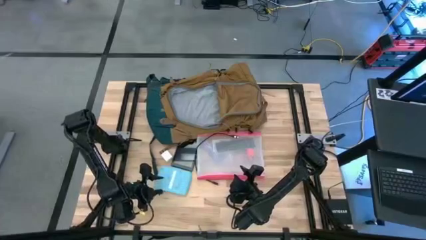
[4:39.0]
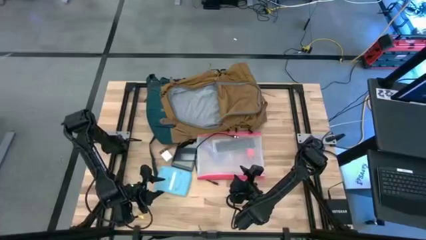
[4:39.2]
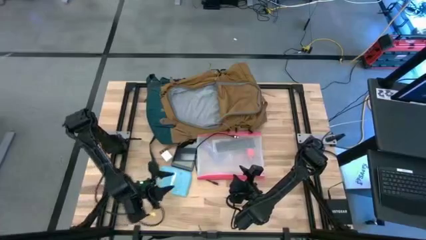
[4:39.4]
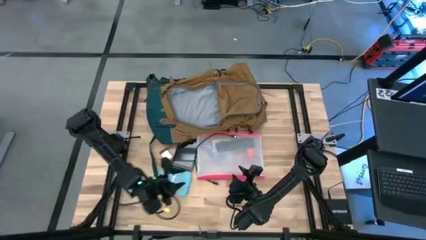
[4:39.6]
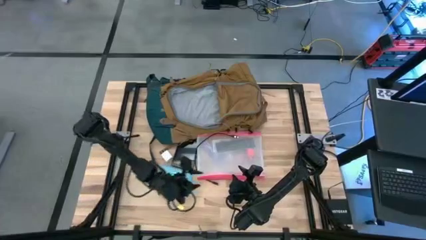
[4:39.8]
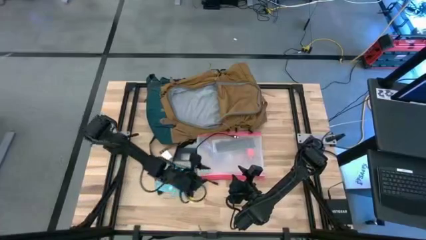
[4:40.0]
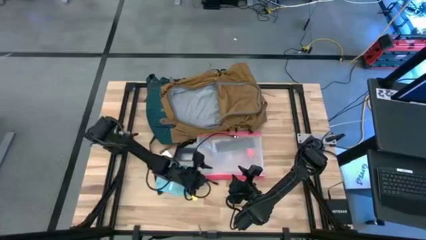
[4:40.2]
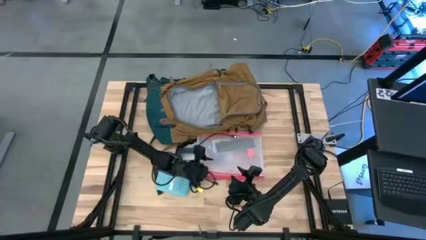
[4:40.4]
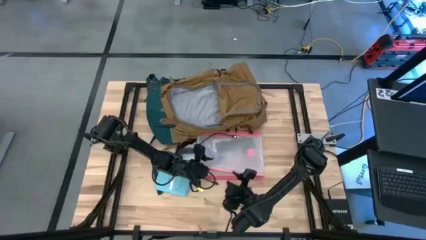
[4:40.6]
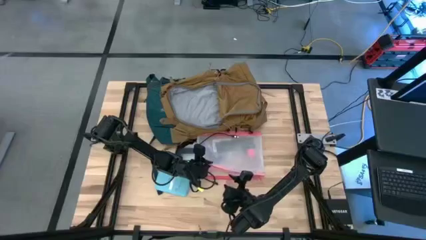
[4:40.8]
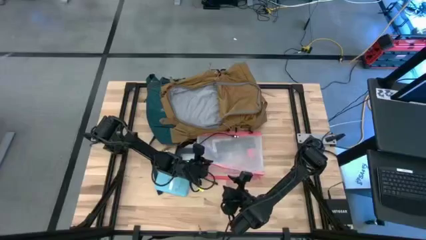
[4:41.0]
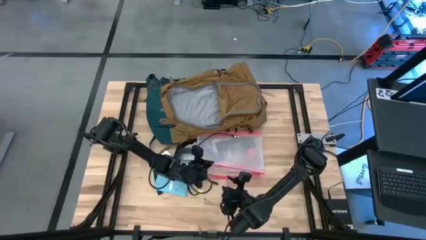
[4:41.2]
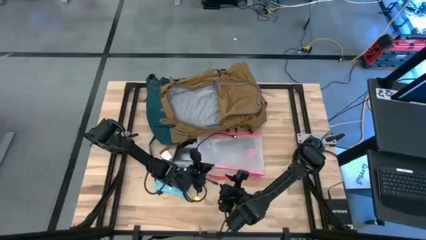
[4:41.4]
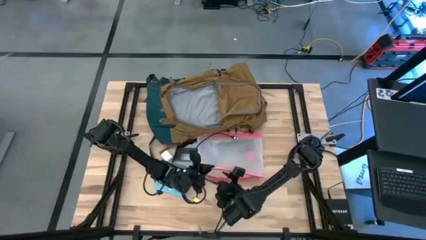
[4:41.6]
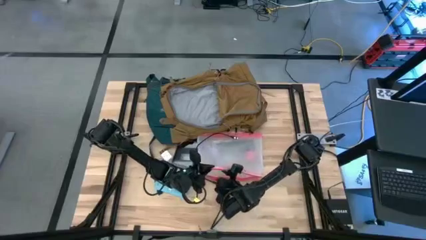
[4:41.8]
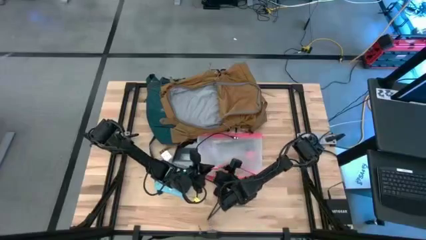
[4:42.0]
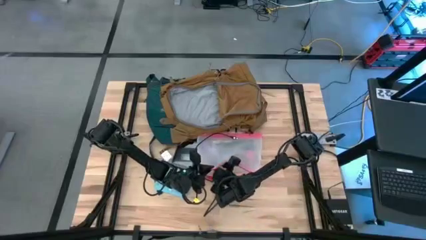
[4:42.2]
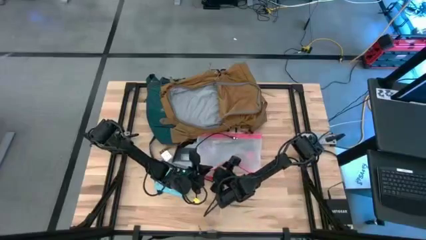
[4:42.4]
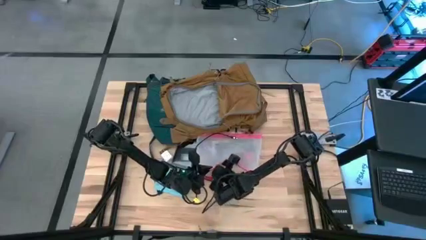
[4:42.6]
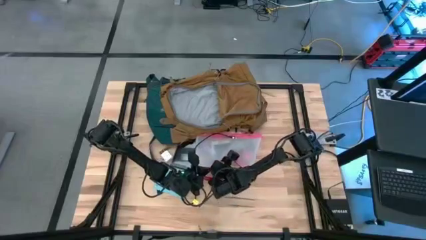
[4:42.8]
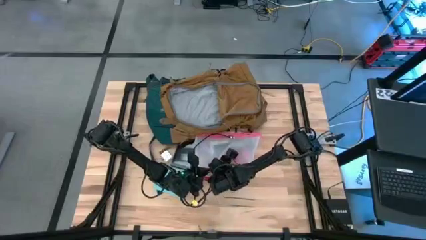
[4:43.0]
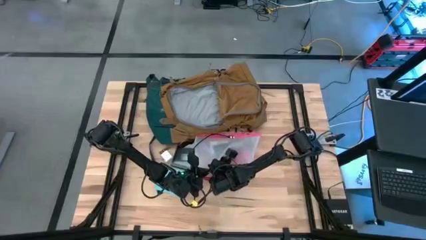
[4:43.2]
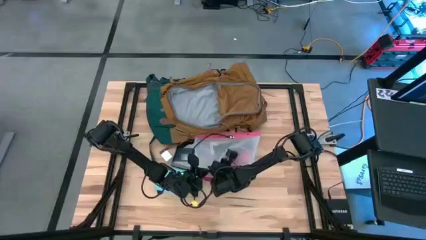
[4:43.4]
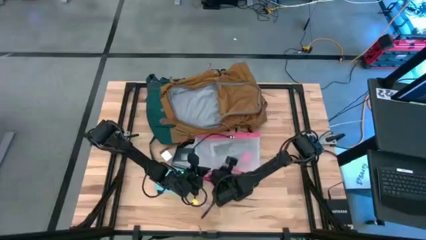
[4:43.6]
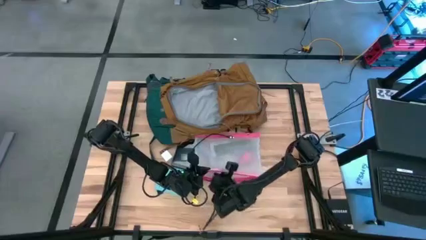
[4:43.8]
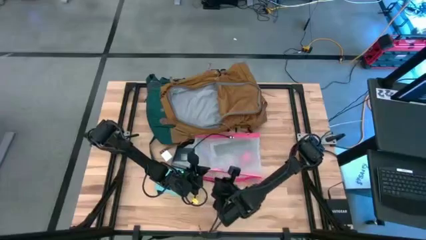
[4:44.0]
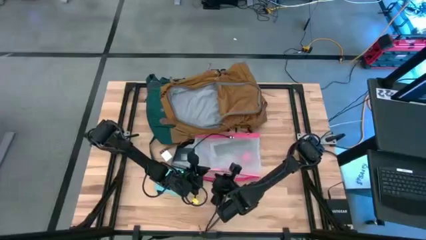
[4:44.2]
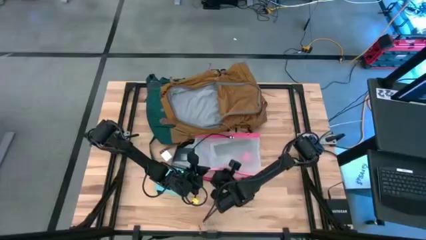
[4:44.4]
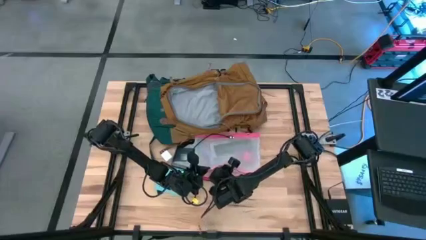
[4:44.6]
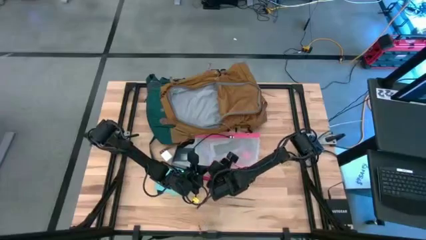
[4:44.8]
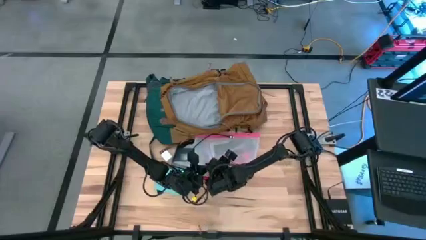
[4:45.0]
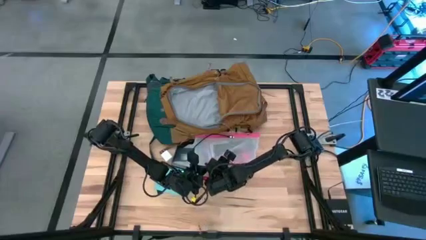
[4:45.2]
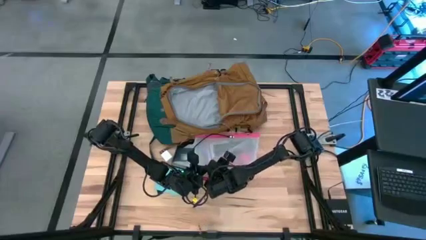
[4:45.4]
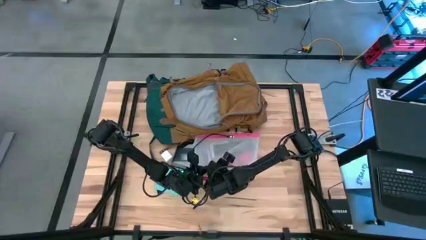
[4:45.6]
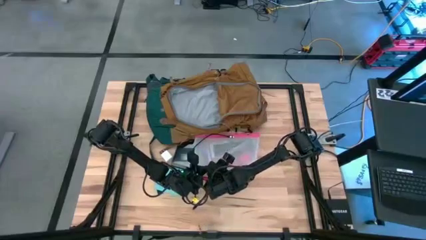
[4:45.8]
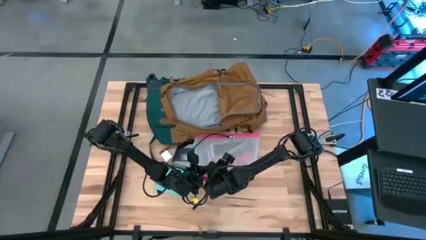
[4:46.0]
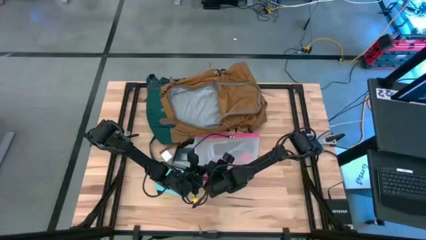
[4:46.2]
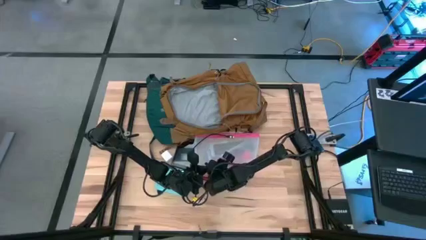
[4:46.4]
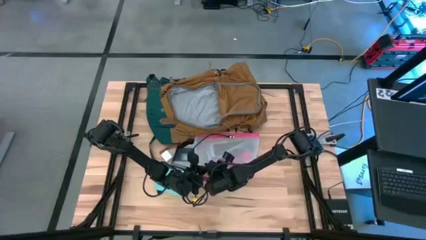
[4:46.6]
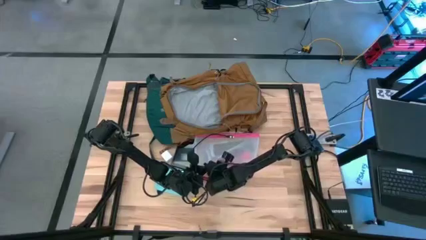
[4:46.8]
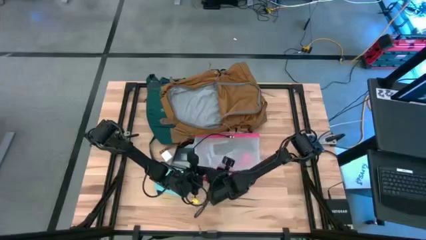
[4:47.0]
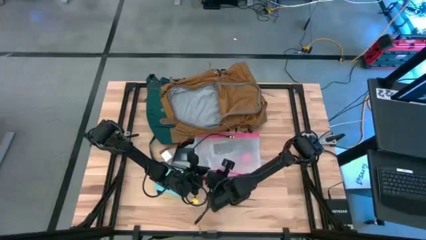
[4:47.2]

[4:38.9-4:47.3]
Task: Unpack backpack
Remove the blue chocolate bar from the pink zipper pouch

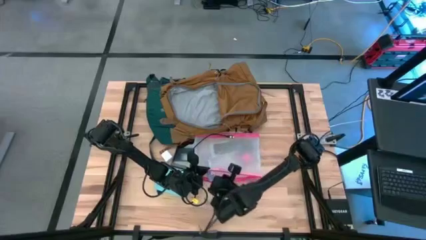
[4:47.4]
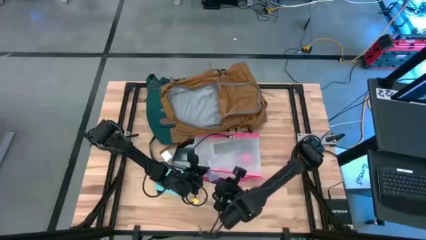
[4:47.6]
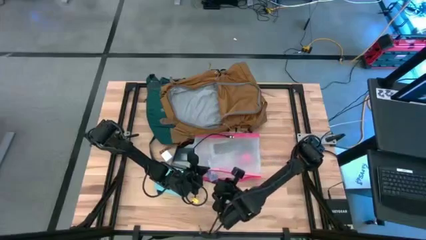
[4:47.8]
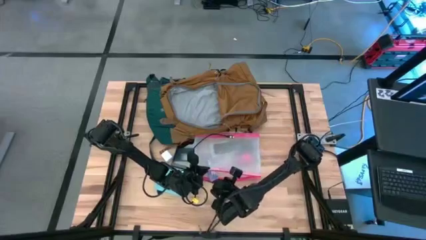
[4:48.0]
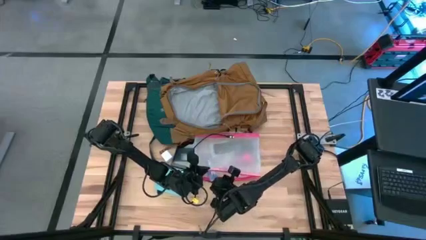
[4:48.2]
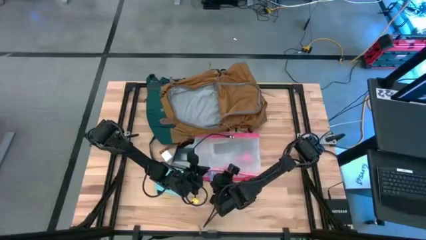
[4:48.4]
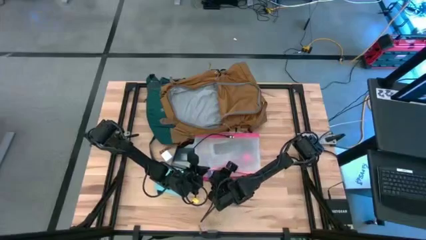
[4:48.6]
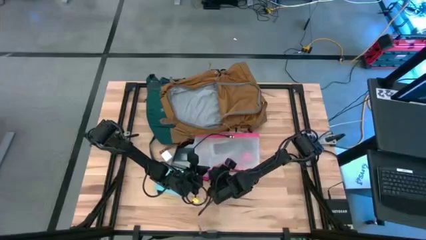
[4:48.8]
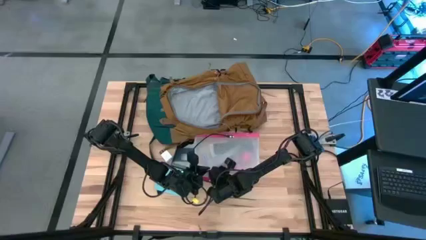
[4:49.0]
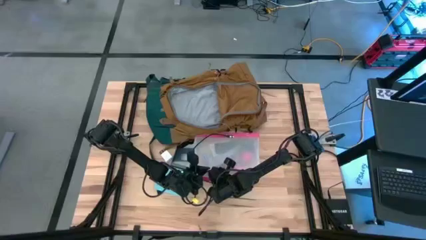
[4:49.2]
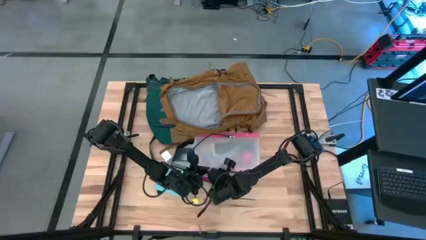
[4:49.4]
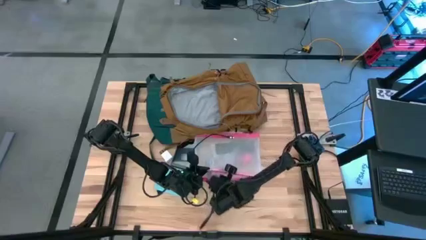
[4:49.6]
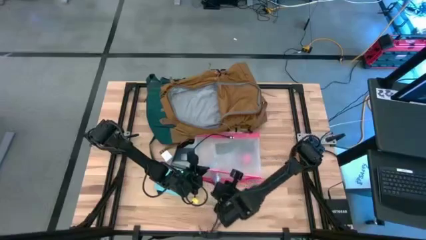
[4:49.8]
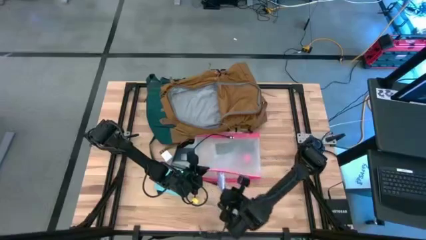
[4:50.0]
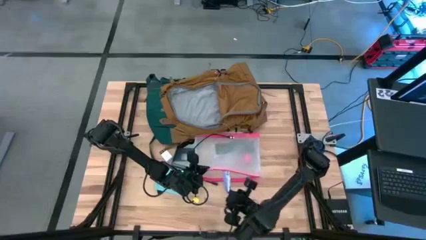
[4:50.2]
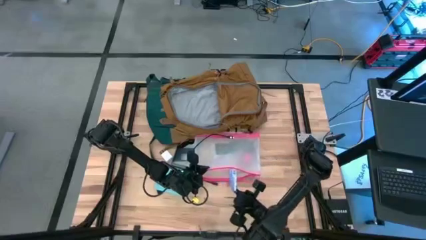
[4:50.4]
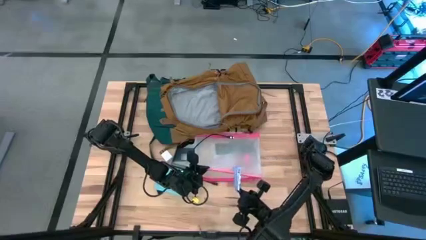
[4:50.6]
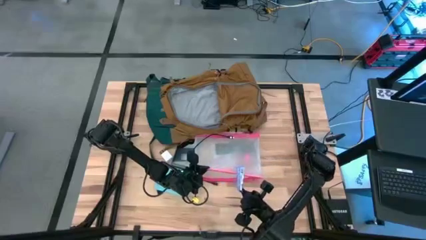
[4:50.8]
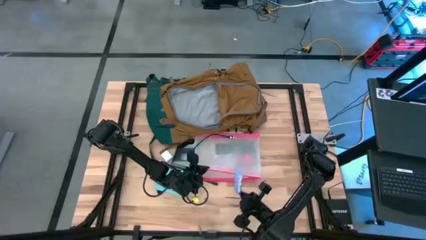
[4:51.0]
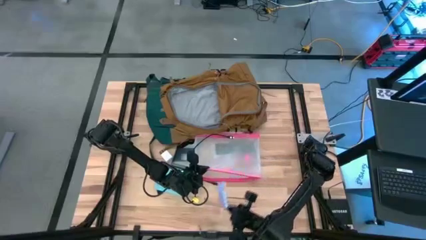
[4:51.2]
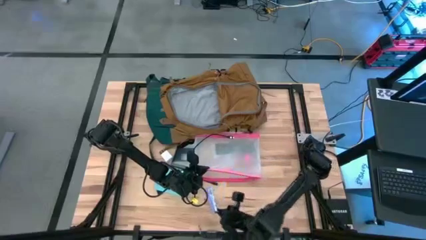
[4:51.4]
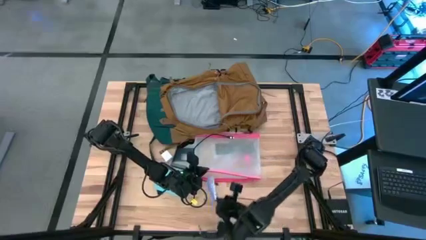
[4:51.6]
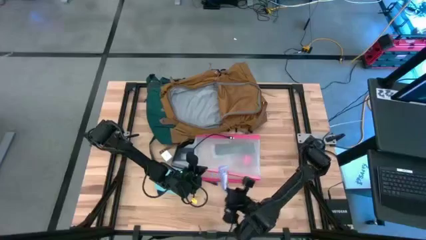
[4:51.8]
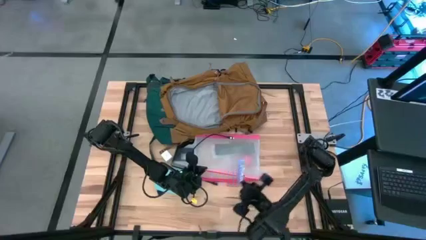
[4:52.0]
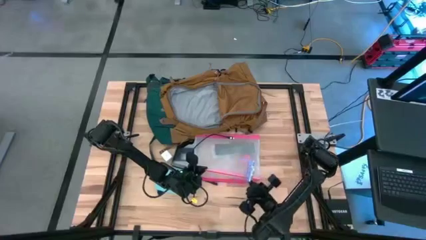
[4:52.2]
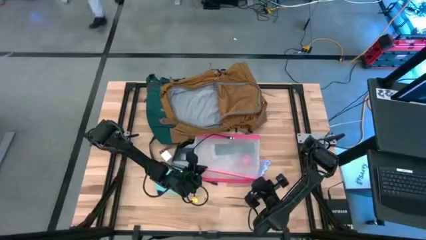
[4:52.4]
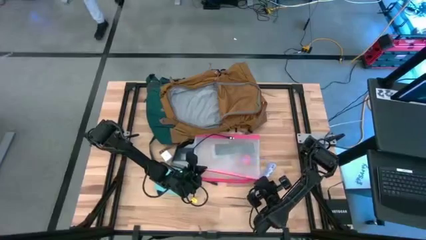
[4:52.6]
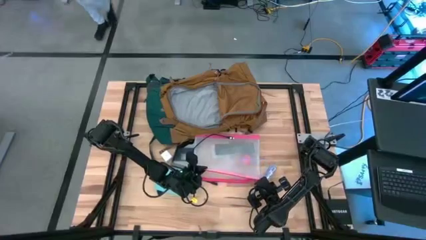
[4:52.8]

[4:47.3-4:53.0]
Remove the blue chocolate bar from the pink zipper pouch

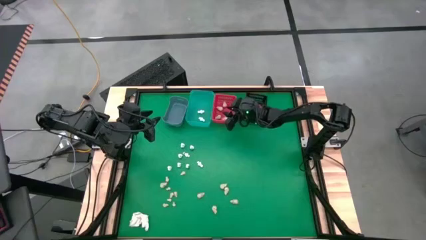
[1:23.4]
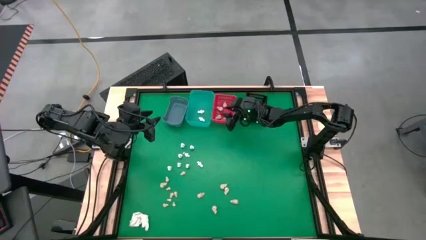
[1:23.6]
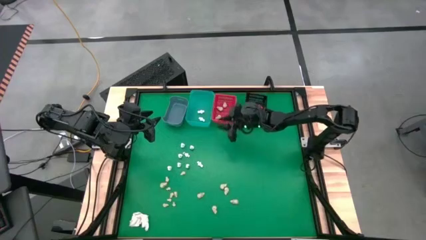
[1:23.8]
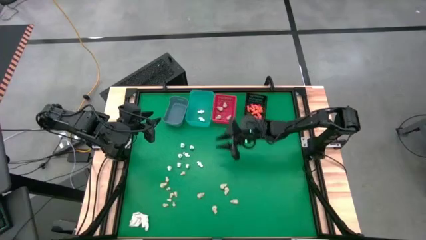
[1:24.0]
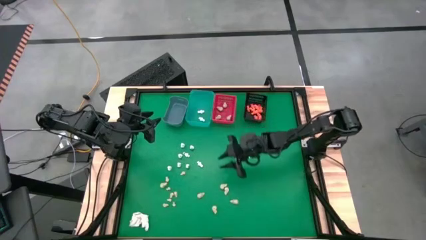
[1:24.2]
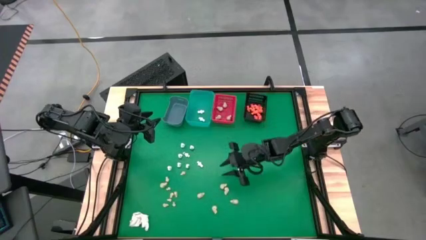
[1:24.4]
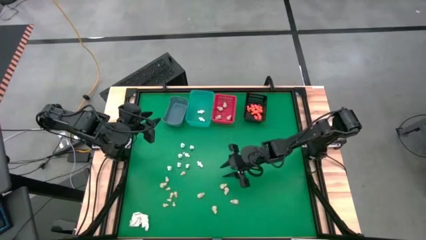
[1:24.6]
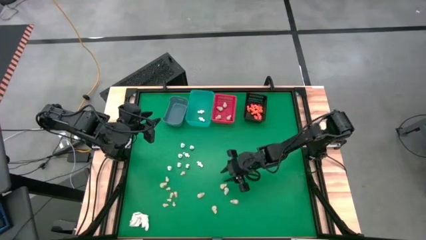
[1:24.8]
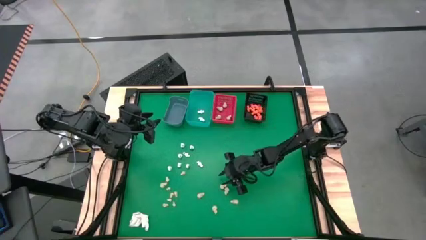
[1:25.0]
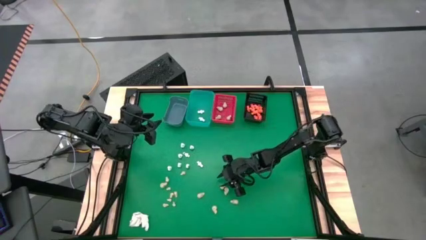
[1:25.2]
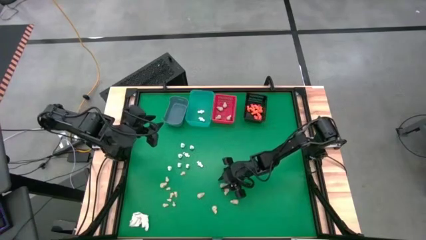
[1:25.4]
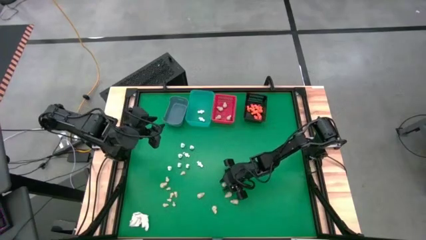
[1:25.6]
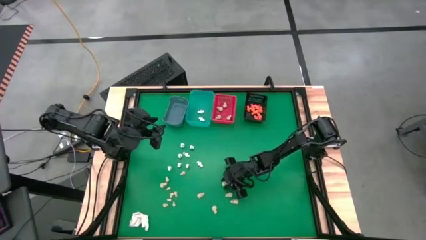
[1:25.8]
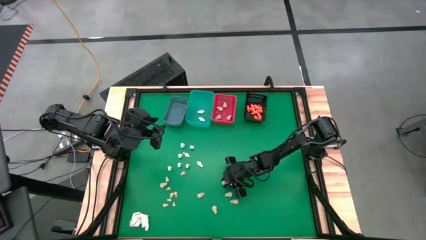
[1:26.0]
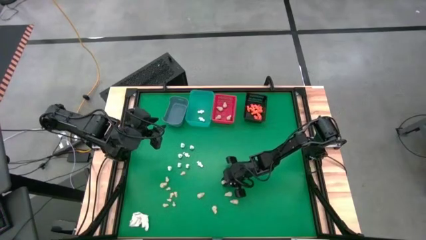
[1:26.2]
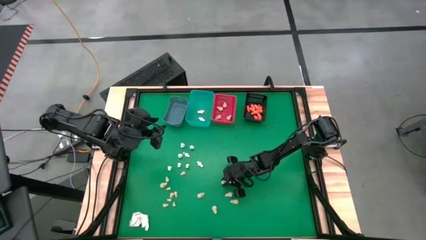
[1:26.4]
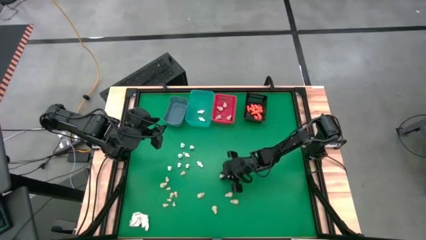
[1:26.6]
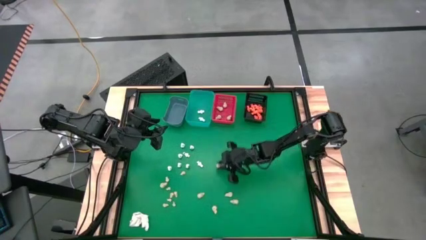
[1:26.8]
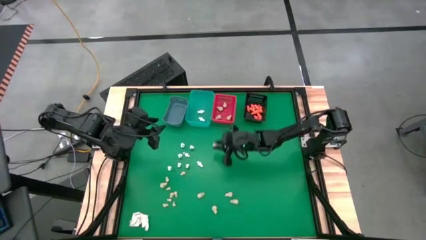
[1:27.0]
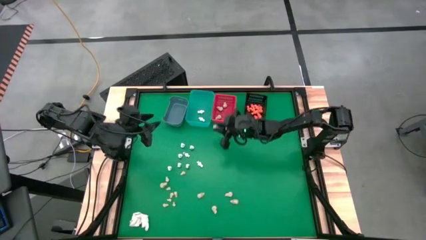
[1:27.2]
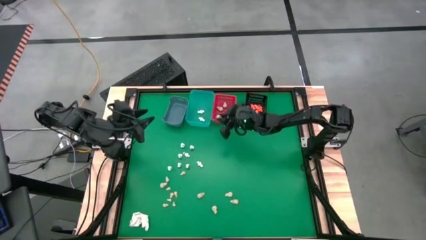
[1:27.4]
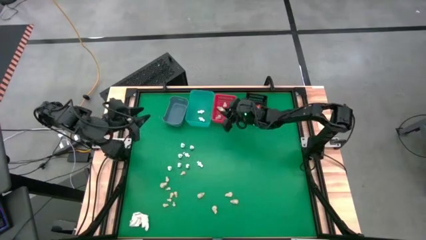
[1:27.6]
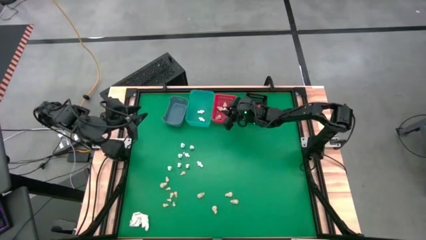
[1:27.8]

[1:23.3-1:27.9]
Task: Sort Halloween decoration
Put the white skull toy into the red bin
